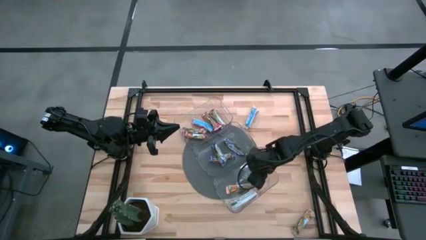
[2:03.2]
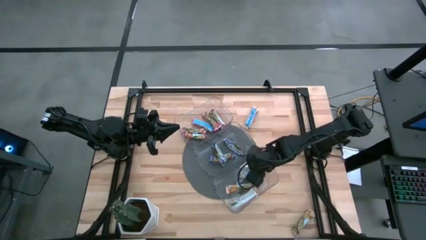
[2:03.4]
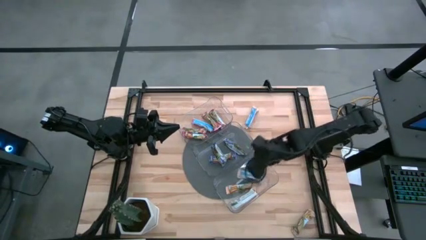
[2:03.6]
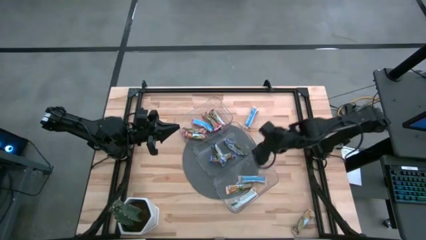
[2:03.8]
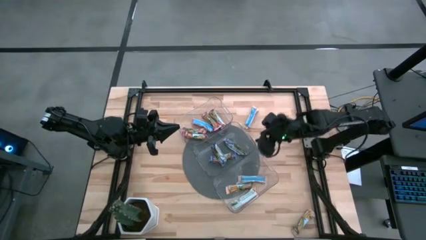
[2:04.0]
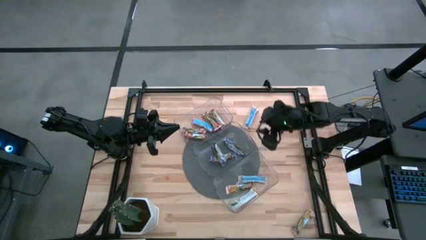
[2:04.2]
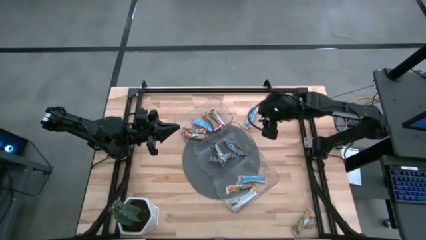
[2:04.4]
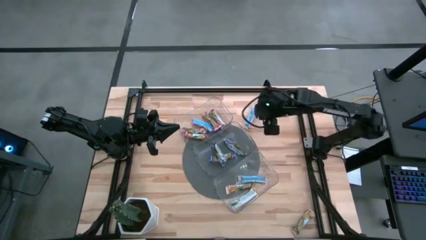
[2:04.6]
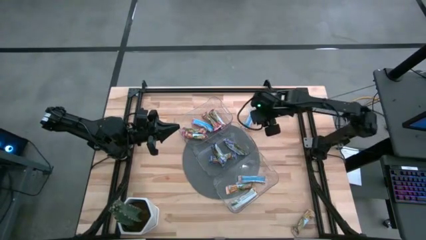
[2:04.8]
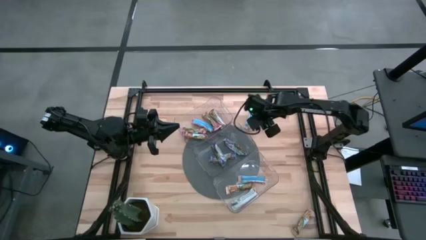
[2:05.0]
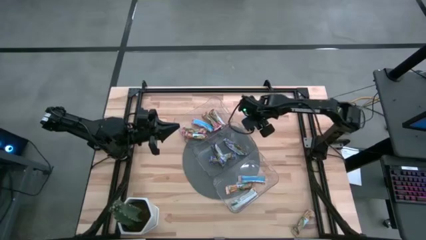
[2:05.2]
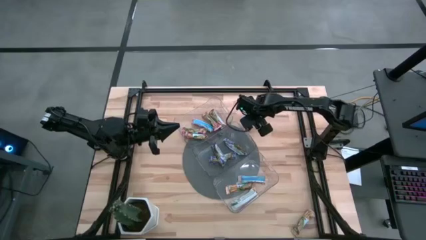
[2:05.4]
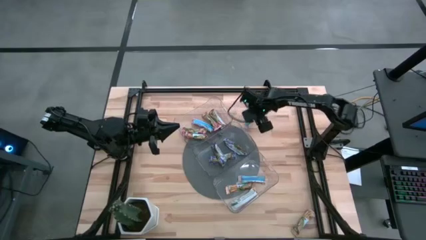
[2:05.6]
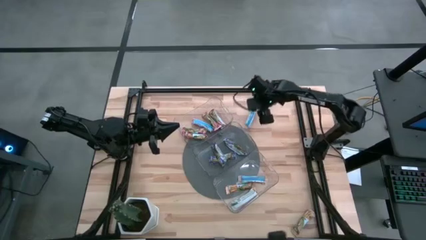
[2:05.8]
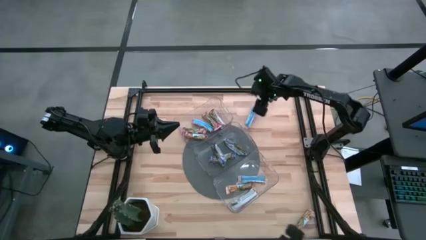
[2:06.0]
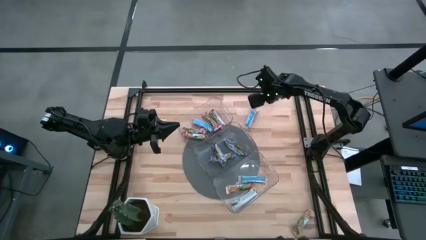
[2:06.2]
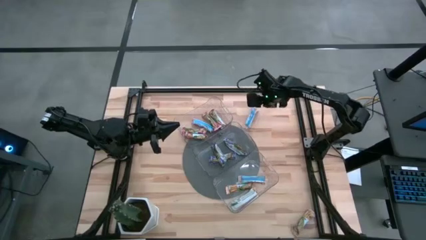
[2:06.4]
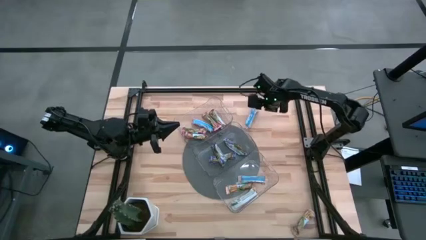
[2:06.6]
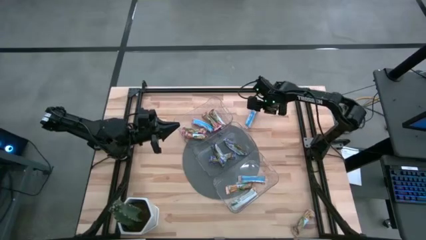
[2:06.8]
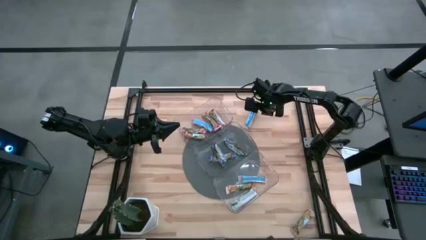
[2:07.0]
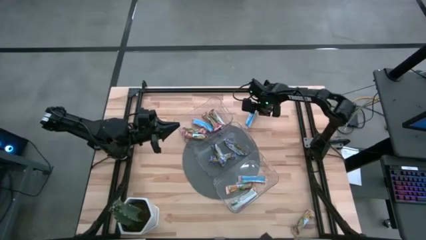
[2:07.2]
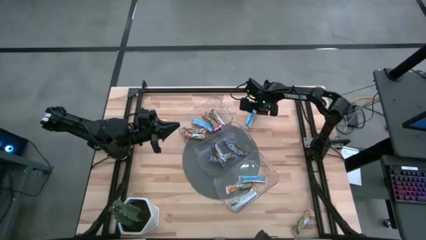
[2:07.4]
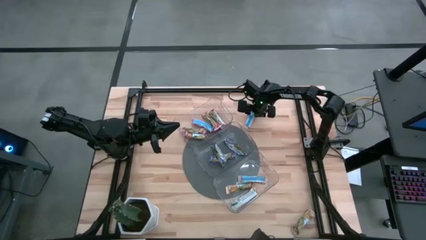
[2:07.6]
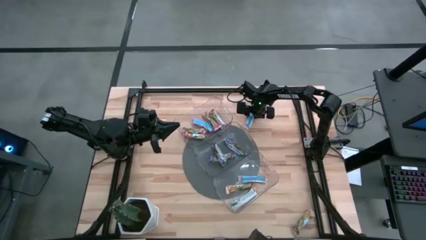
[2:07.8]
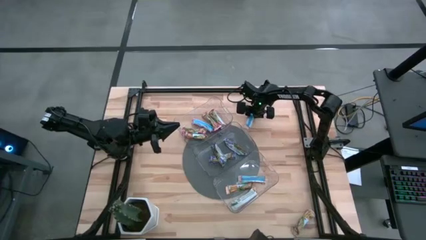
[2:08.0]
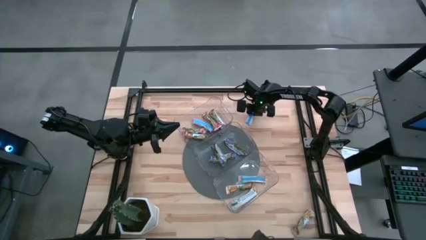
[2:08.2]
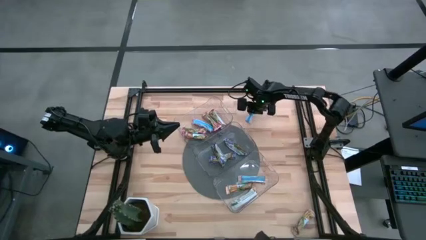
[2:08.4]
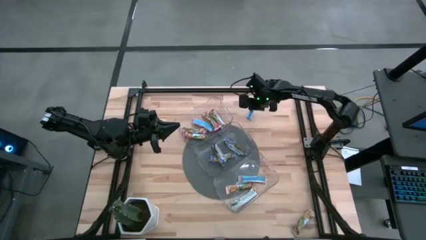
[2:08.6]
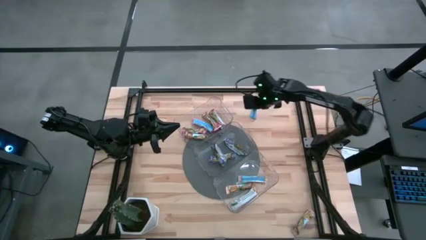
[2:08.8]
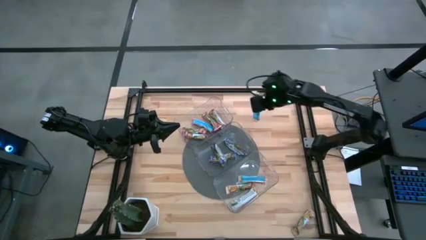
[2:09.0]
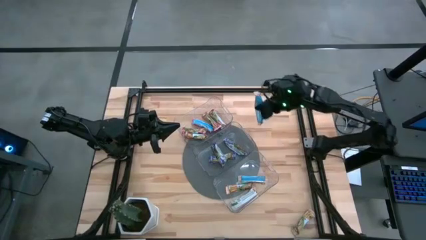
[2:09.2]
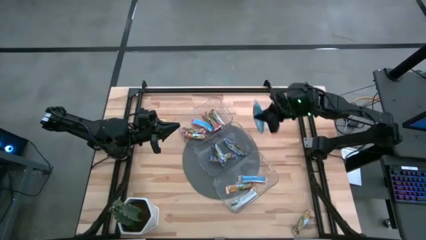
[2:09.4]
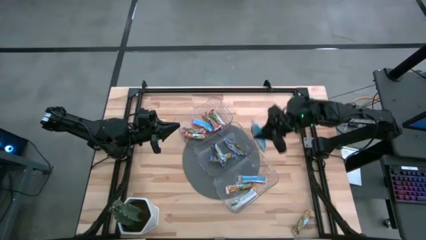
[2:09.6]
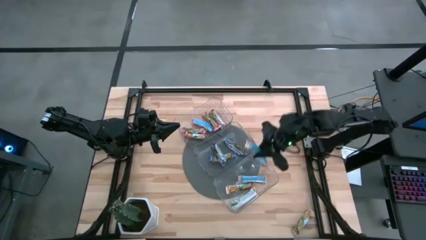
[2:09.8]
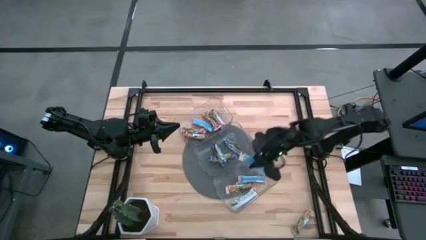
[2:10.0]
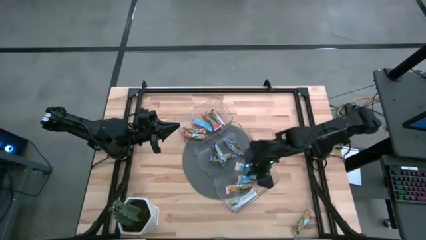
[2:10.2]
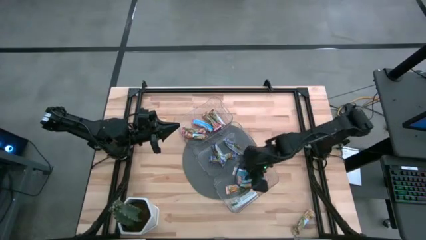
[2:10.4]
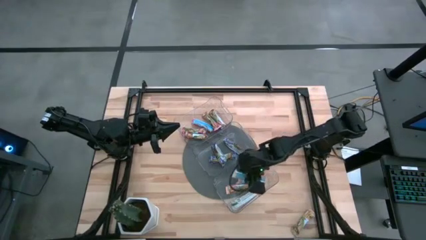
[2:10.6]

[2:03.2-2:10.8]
Task: Pick and place Granola Bars by type
Put the yellow granola bar into the bottom transparent bin

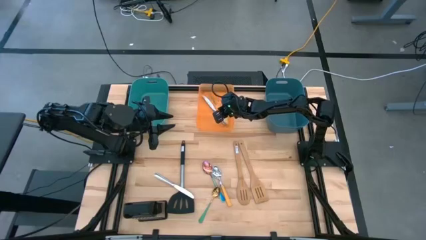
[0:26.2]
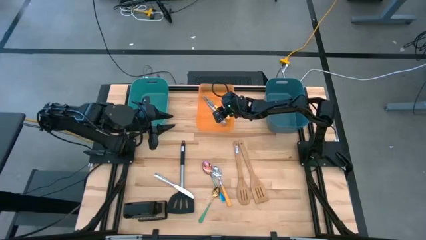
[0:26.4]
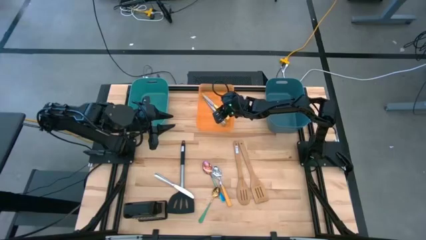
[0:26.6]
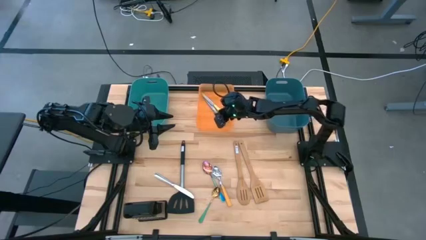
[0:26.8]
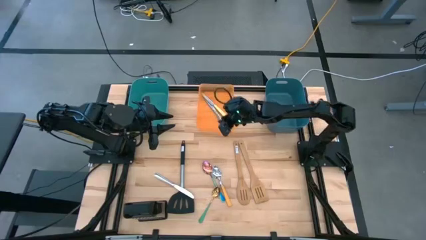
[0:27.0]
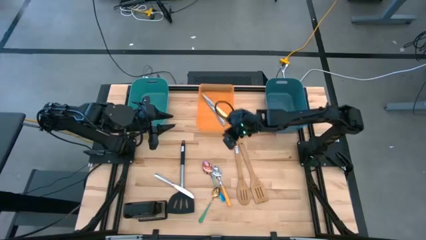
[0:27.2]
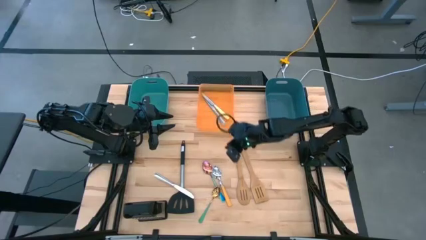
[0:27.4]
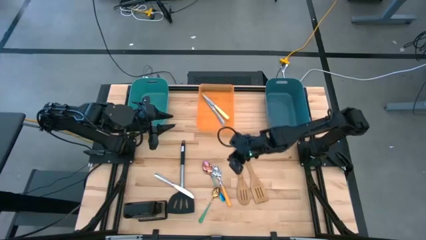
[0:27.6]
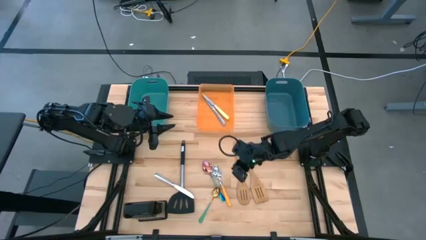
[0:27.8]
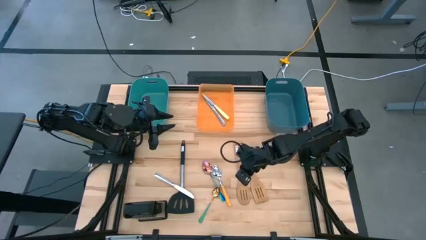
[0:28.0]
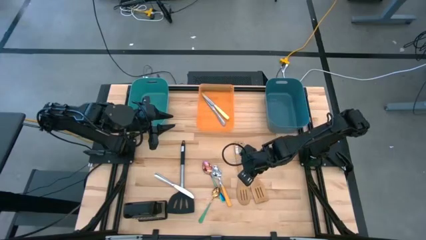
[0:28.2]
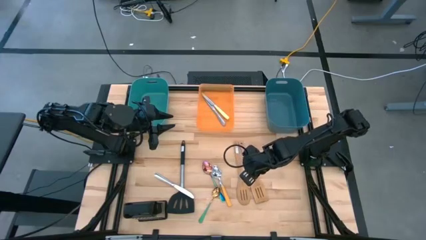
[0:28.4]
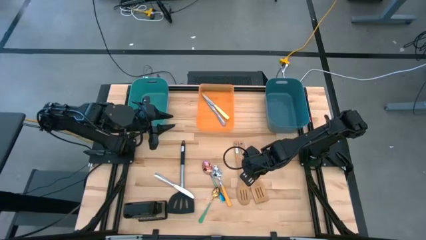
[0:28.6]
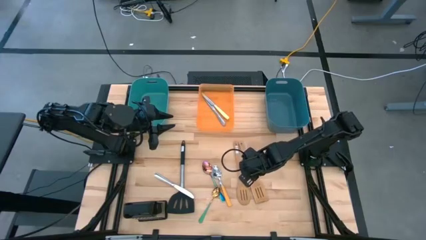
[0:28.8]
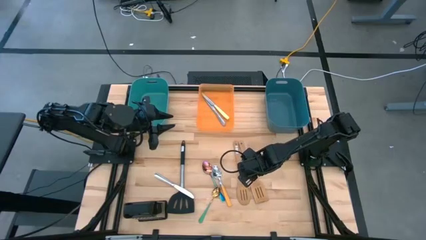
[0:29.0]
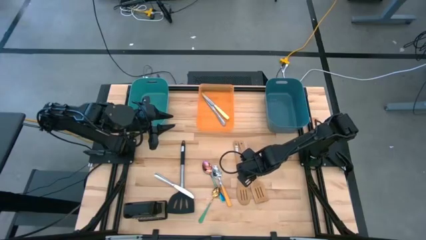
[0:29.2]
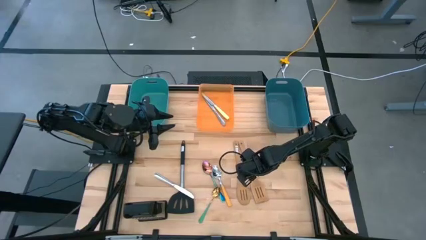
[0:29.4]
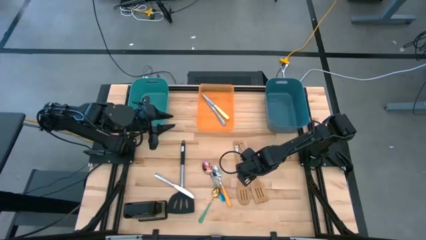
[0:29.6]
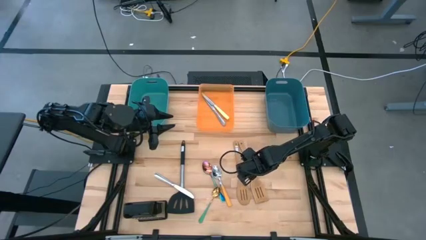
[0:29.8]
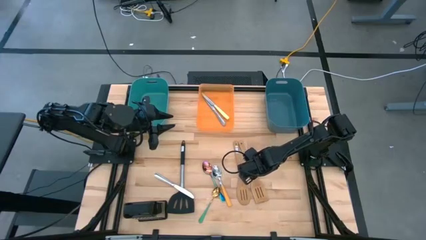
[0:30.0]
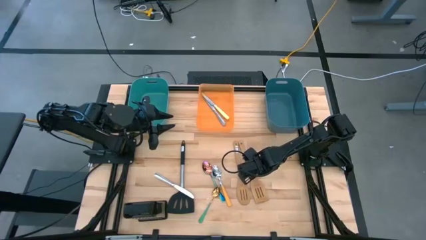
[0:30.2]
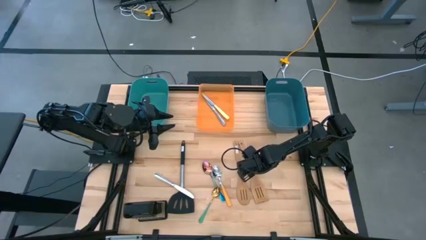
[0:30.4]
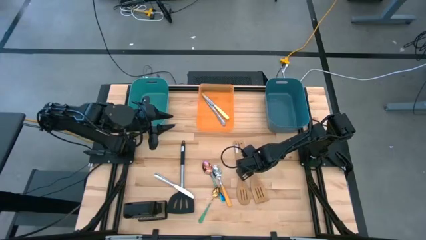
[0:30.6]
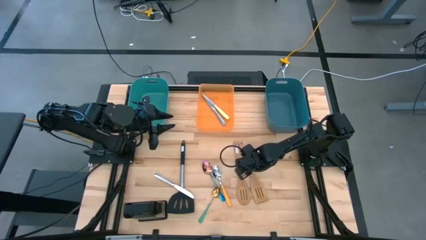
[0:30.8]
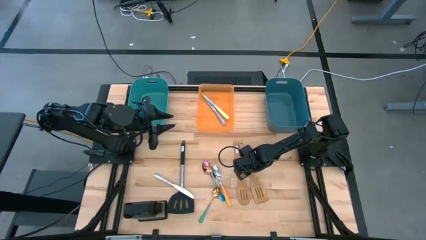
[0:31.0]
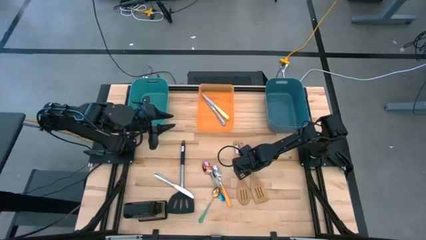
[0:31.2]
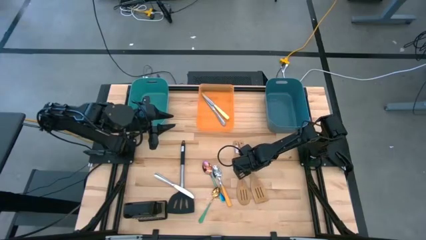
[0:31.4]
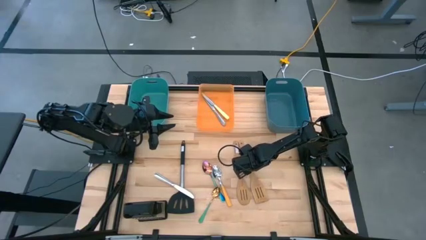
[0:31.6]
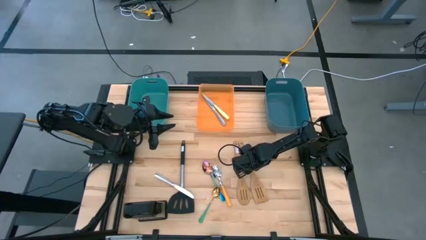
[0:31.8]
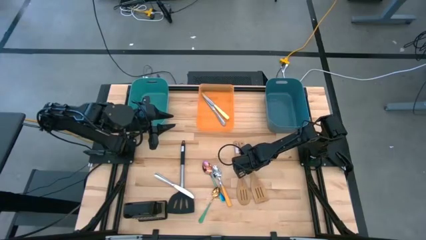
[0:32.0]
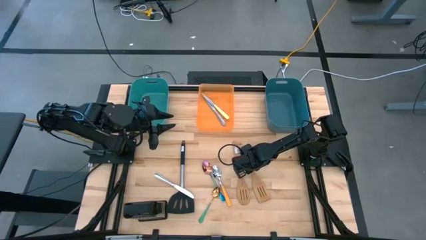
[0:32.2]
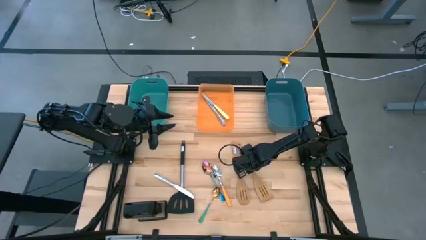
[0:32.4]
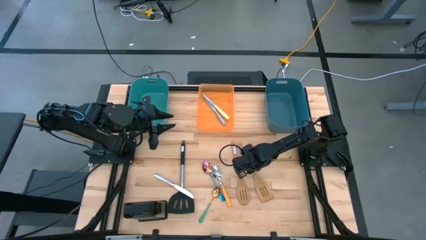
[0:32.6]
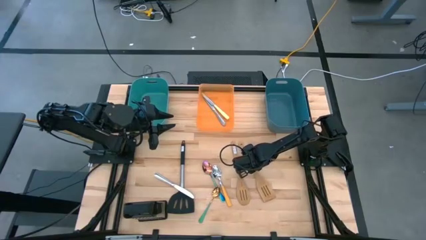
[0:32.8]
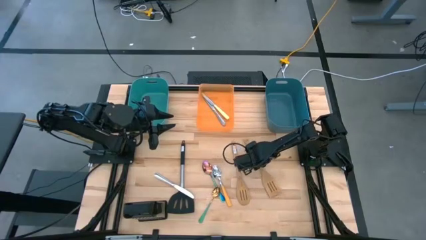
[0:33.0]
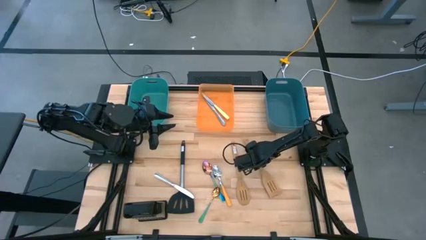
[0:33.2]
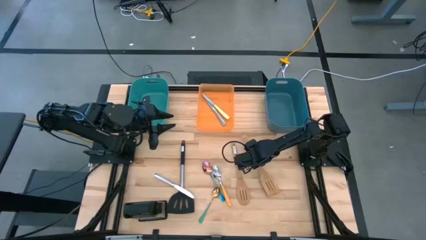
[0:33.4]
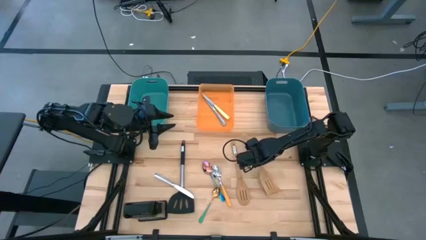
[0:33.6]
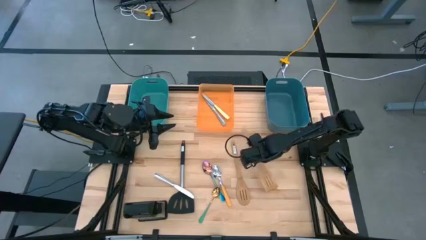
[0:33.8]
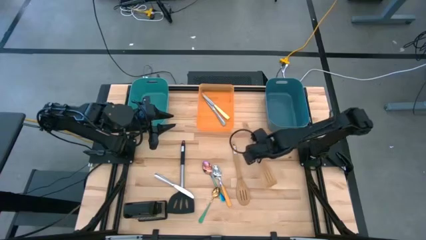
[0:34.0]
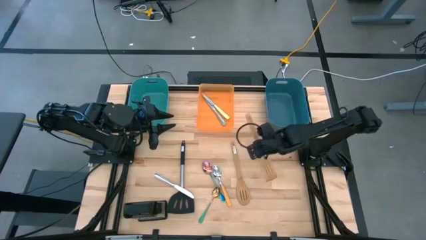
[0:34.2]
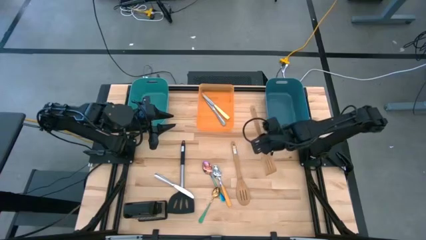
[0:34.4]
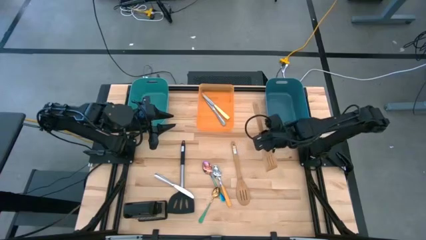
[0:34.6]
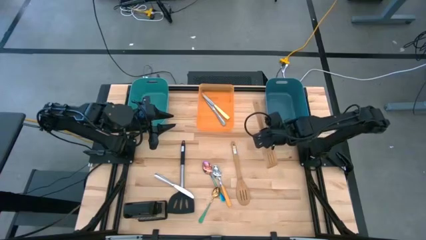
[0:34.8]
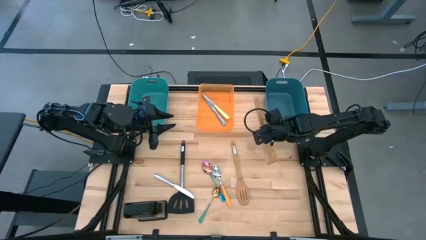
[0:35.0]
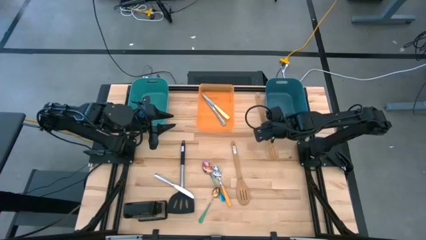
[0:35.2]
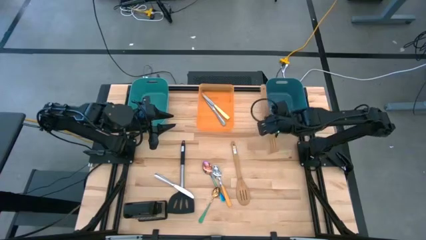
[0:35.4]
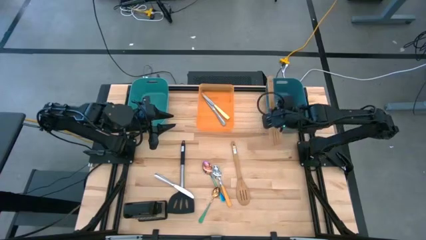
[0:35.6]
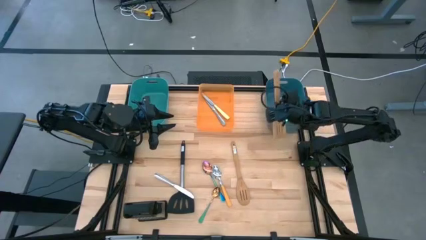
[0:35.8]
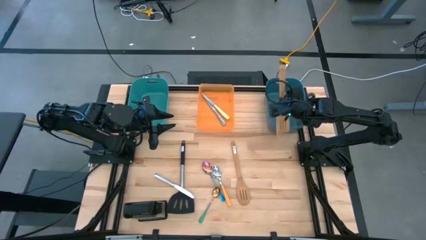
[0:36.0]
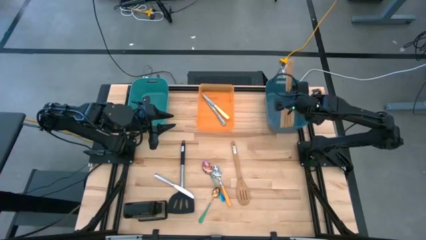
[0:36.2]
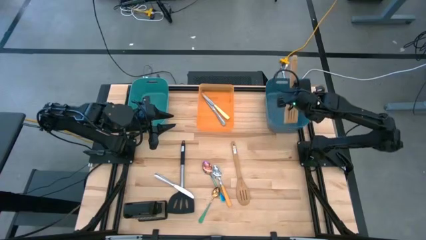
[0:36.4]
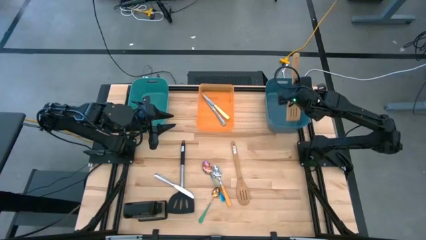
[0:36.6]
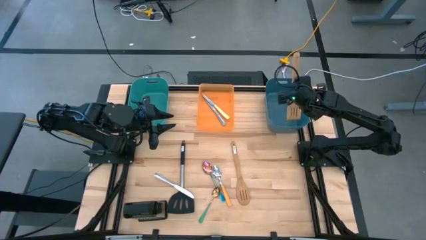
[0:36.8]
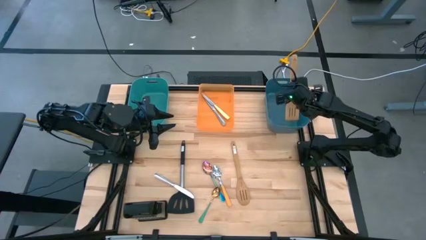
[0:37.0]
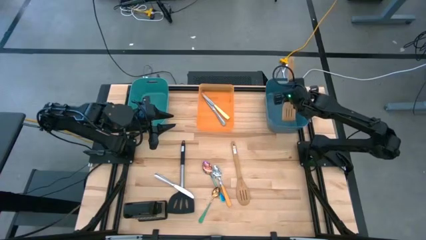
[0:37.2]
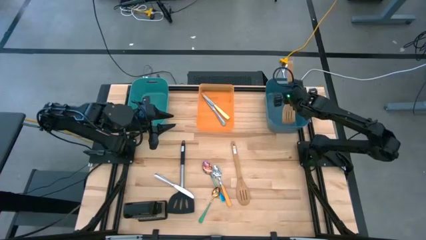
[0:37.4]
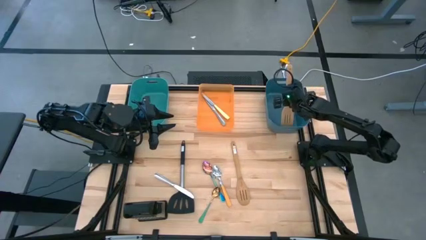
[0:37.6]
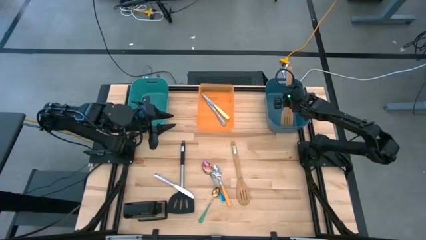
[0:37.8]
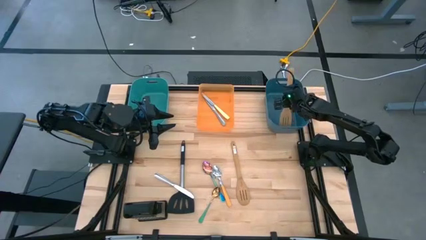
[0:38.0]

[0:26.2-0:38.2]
Task: Pick & Place Kitchen Items
Put the brown spatula into the blue bin
